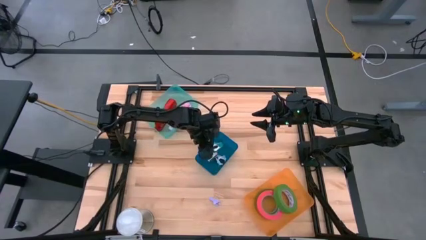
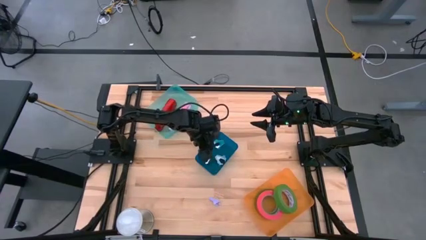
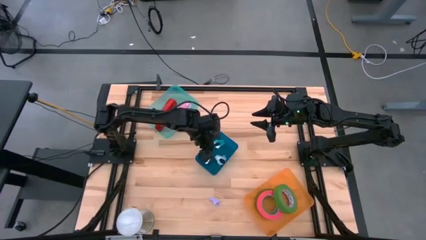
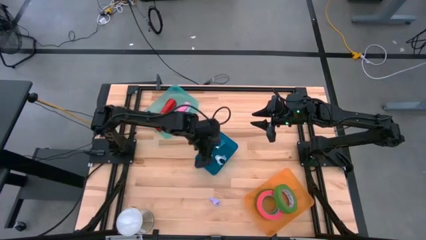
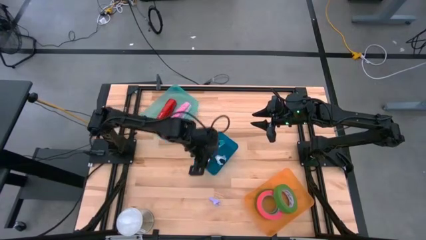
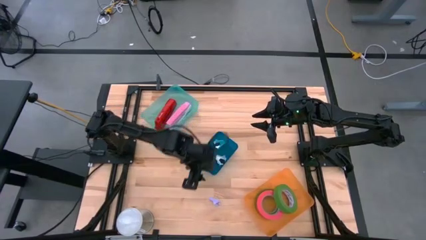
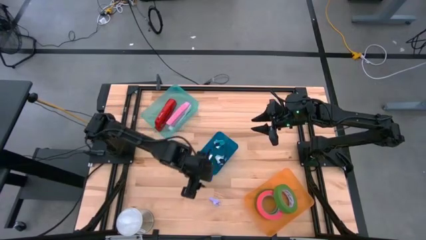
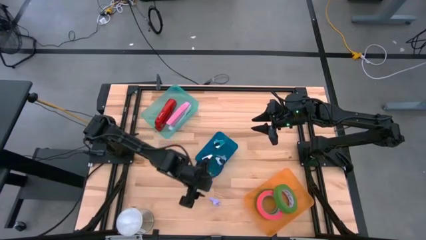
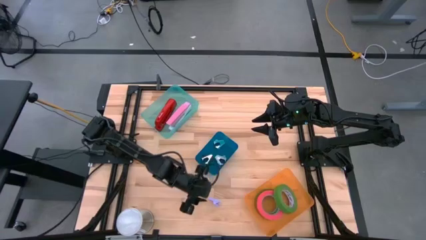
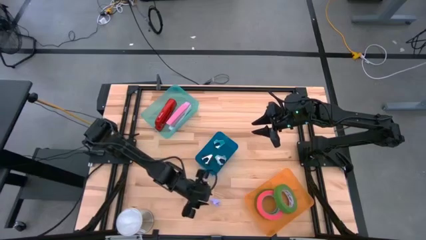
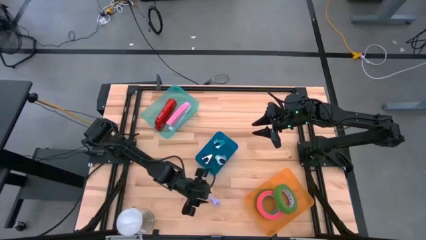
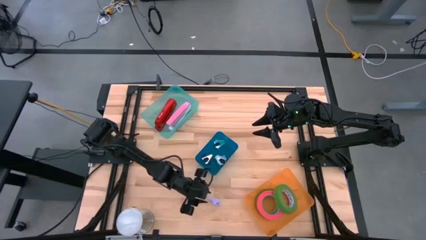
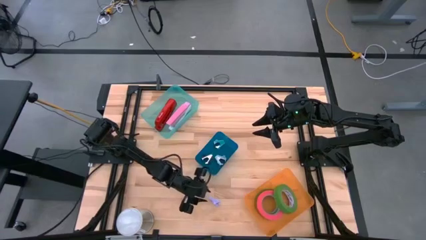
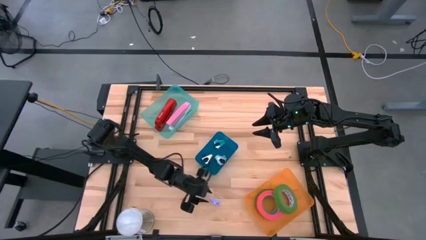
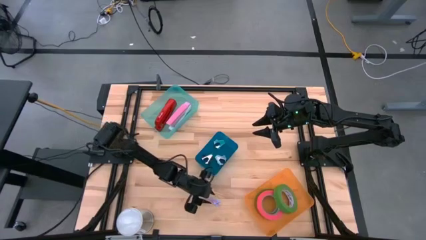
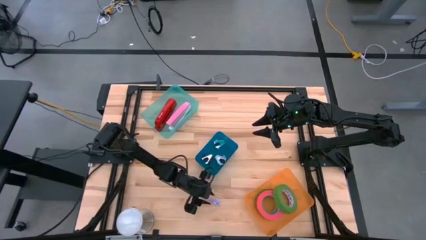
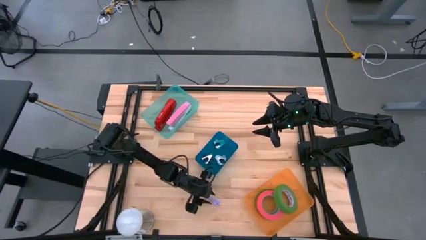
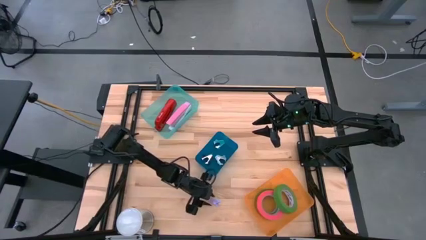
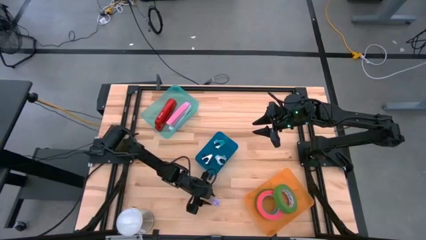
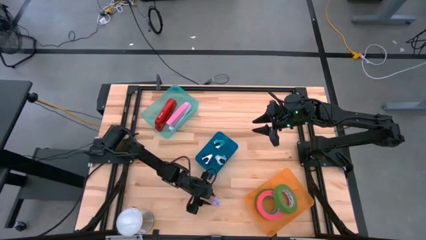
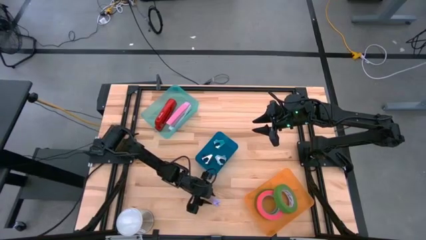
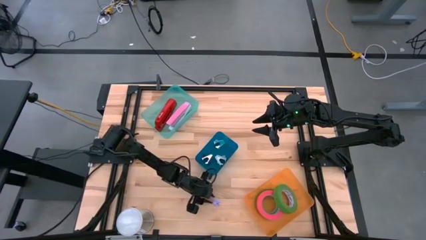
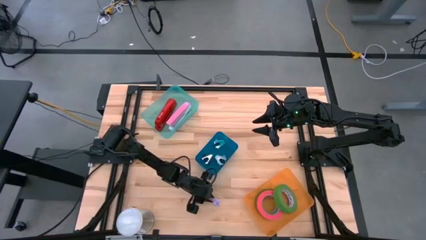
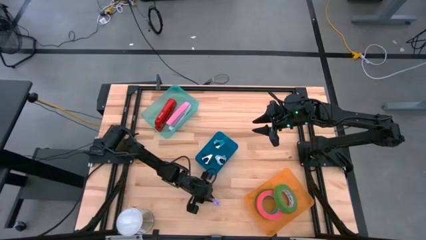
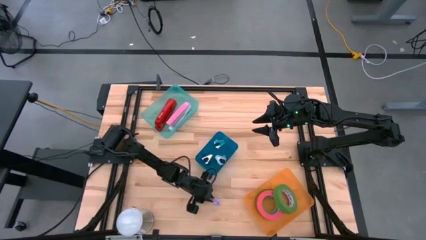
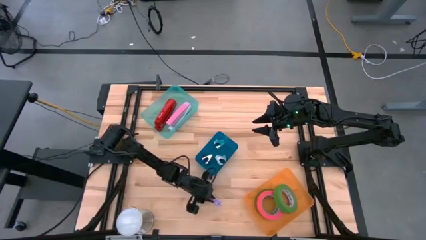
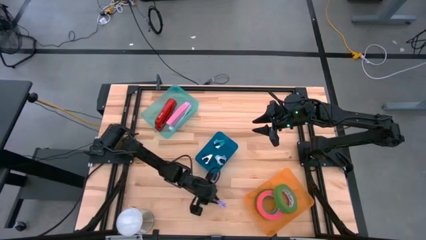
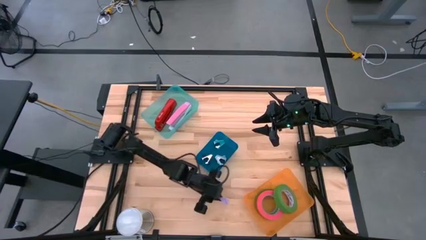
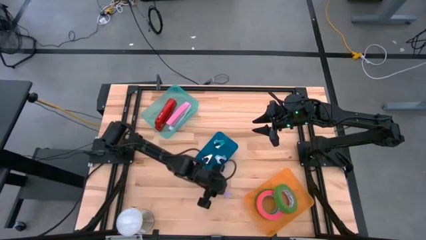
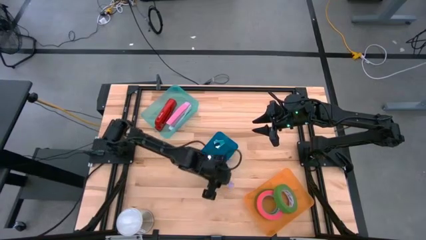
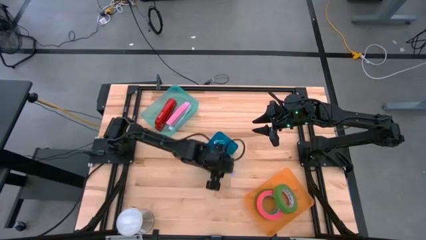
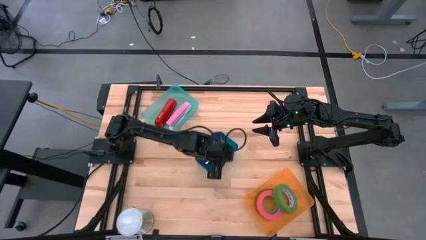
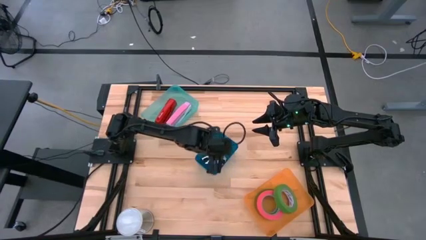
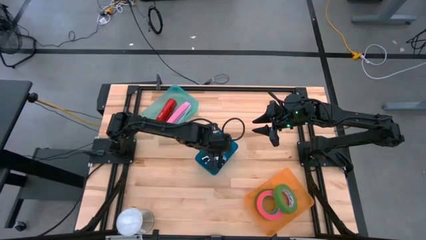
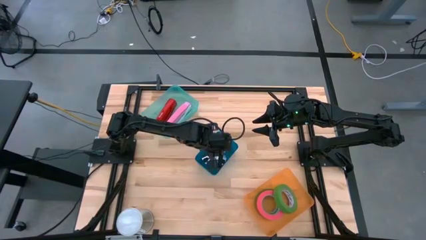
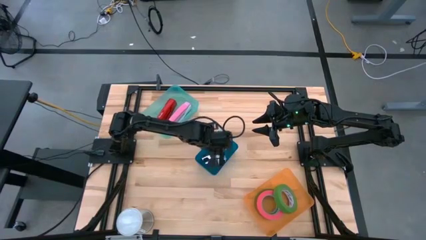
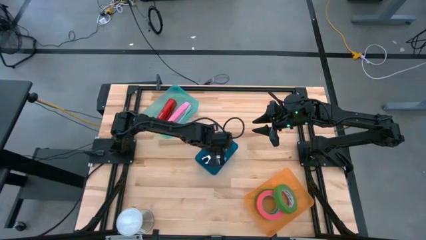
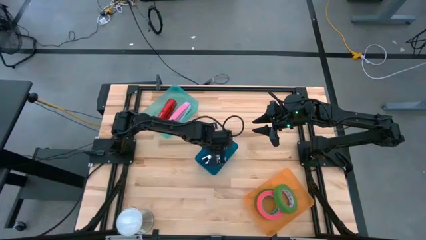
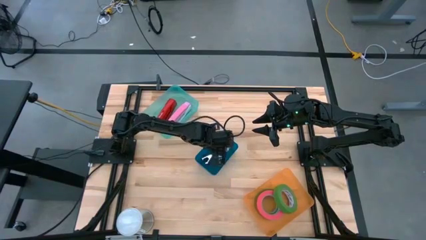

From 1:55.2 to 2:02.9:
Task: Pick and place Stapler, Stapler remover, tape
Put the purple staple remover into the blue bin

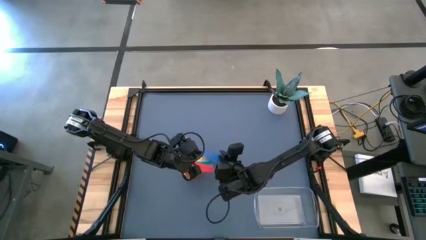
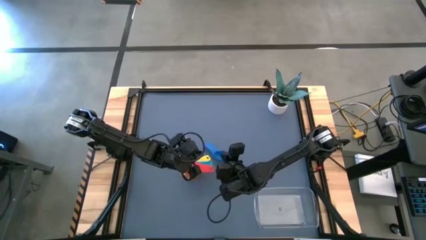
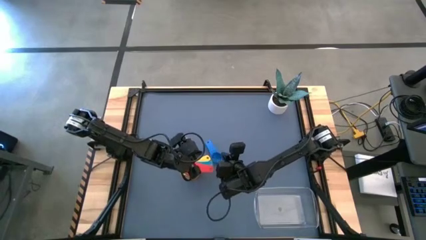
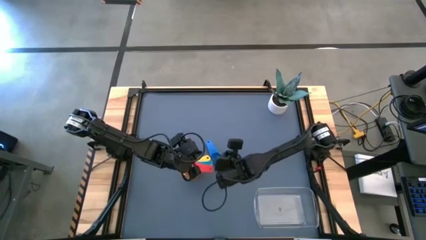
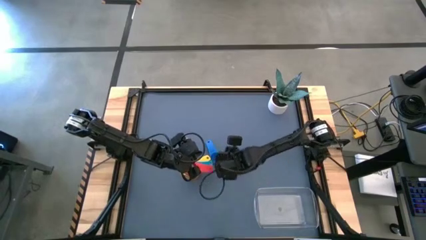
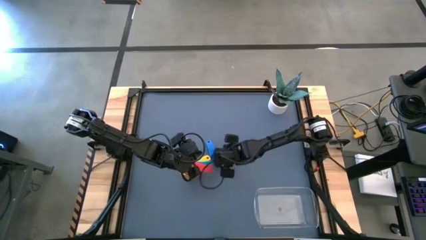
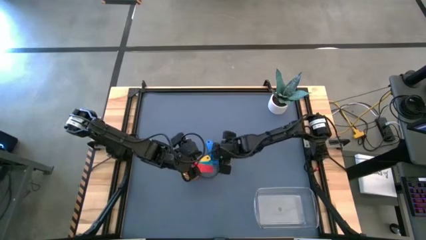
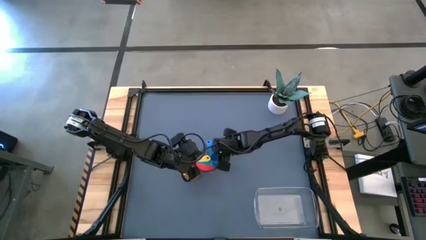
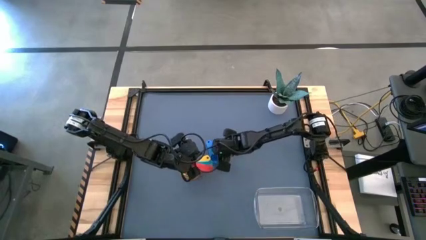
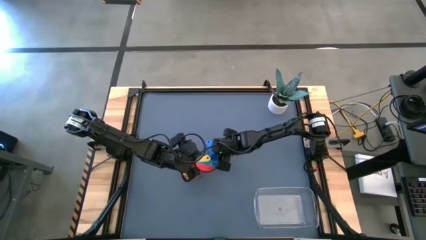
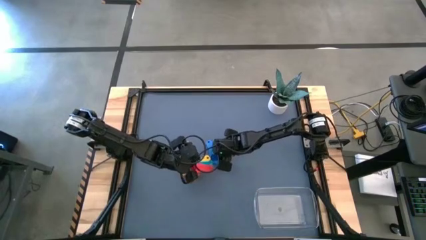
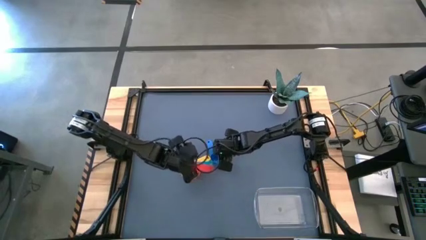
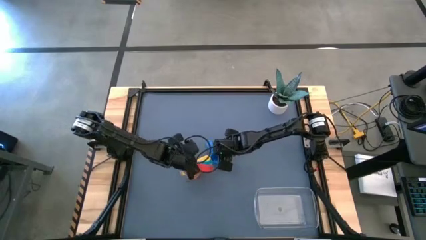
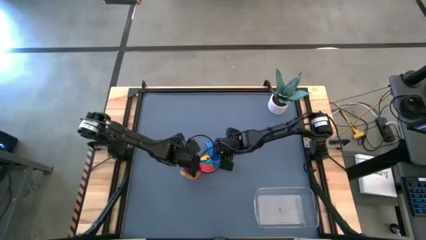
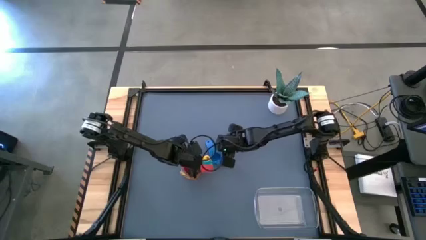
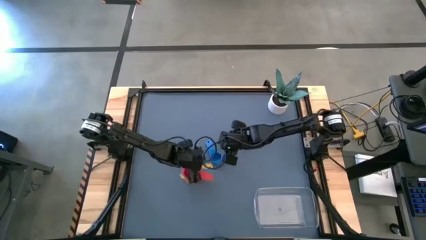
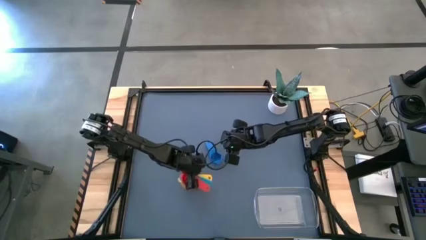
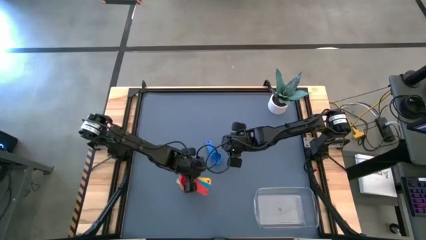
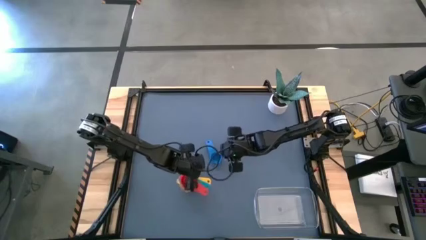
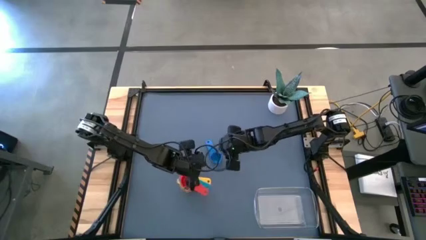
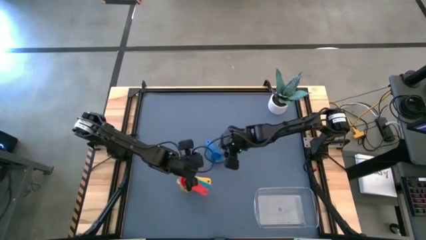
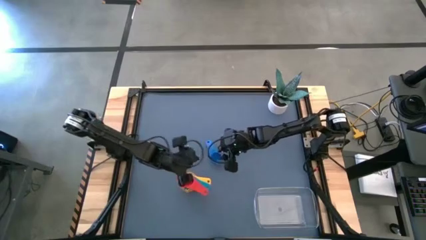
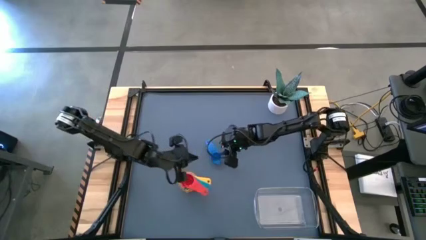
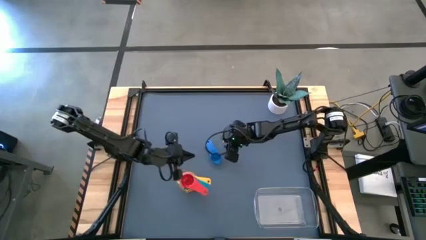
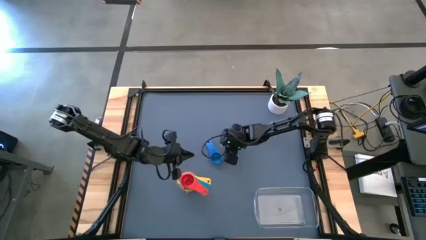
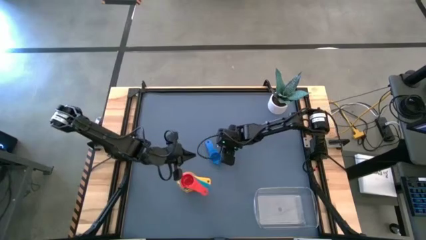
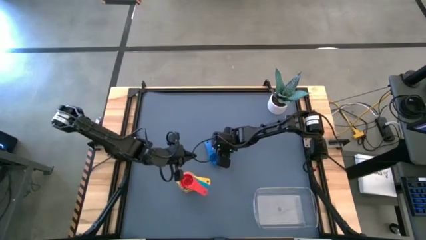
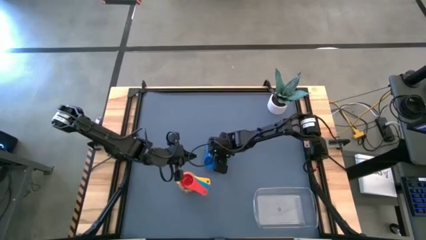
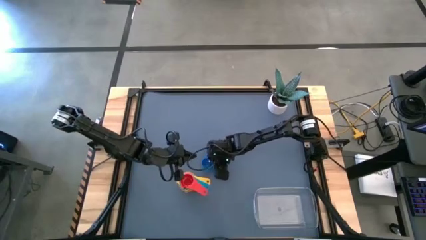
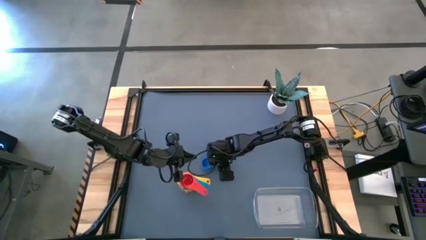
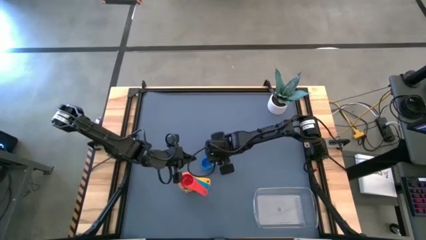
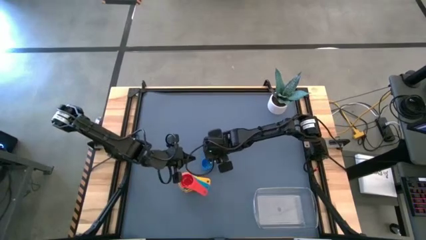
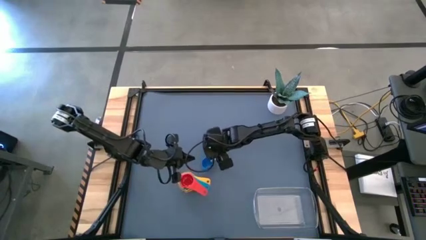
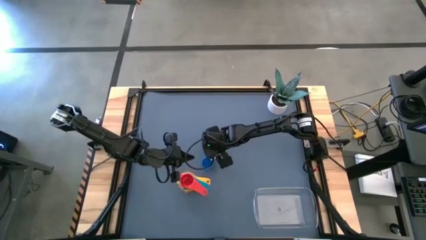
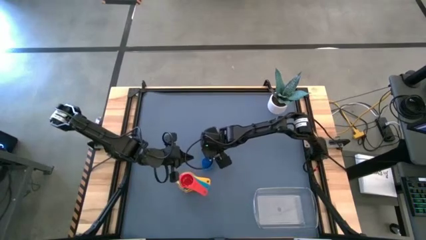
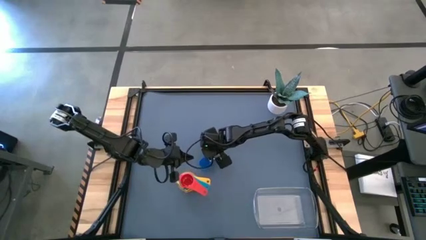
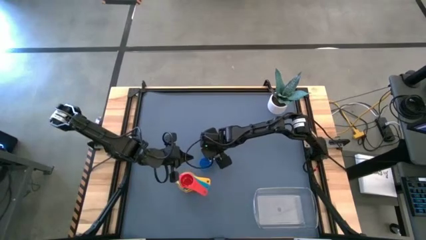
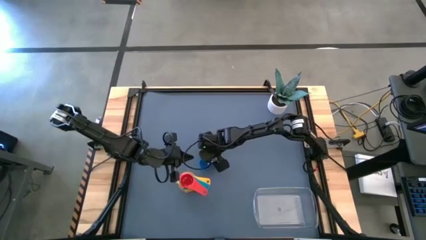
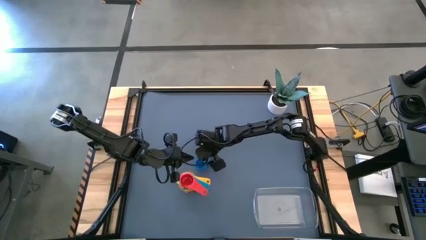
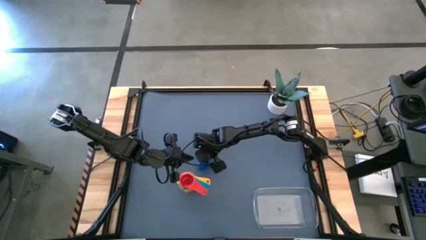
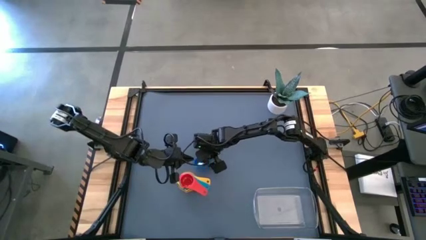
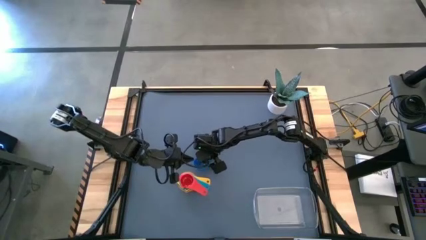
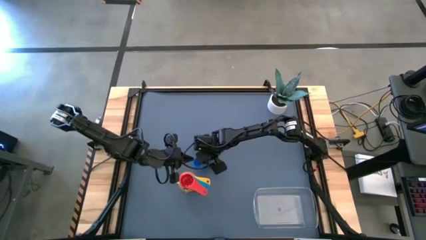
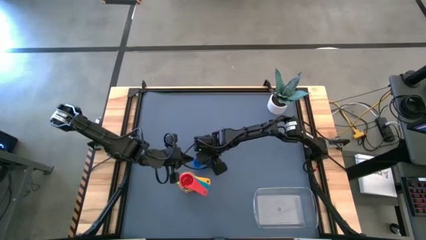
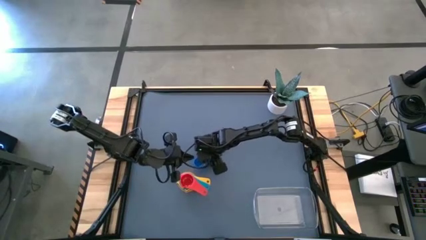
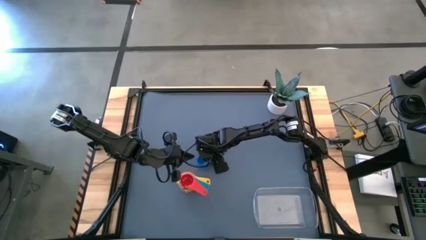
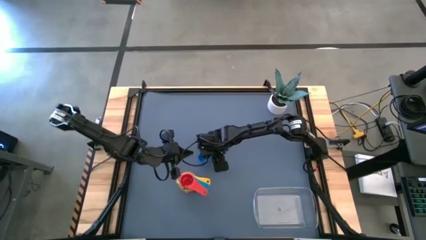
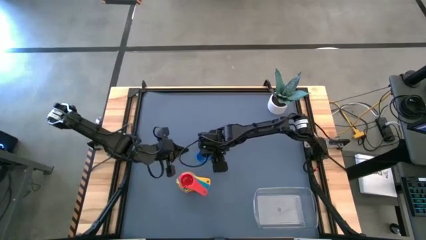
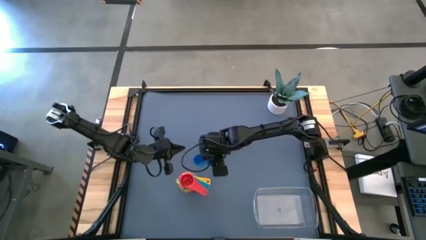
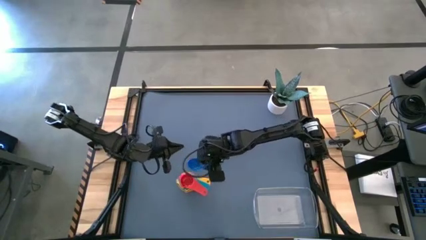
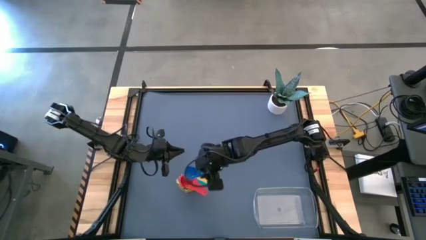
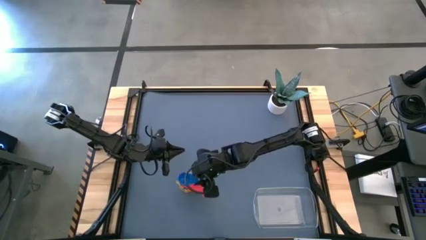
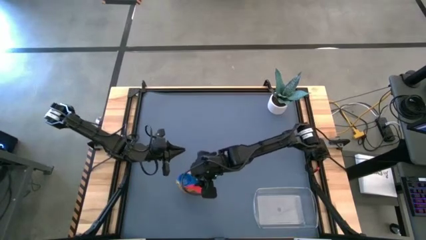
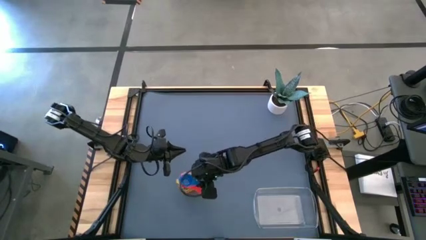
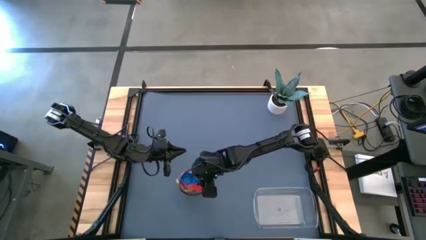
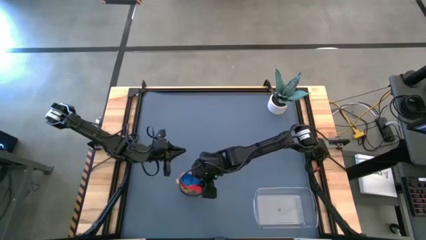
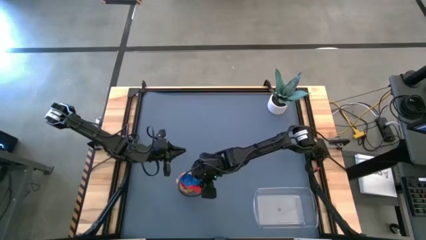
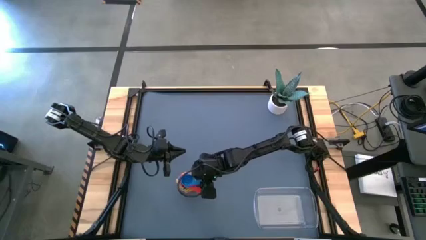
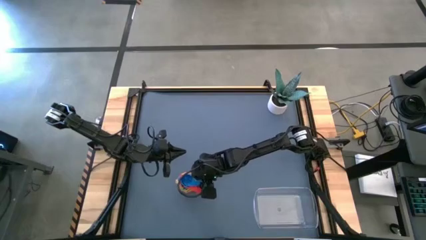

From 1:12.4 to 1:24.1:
Task: Nest measuring cups in basket
Stack the blue measuring cup on top of the red measuring cup
